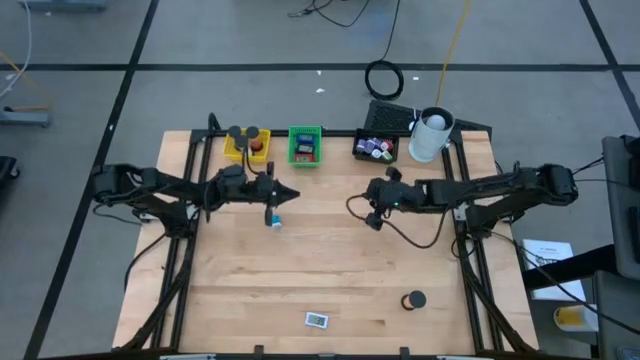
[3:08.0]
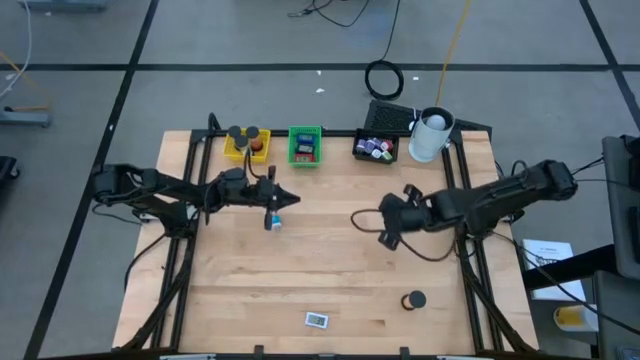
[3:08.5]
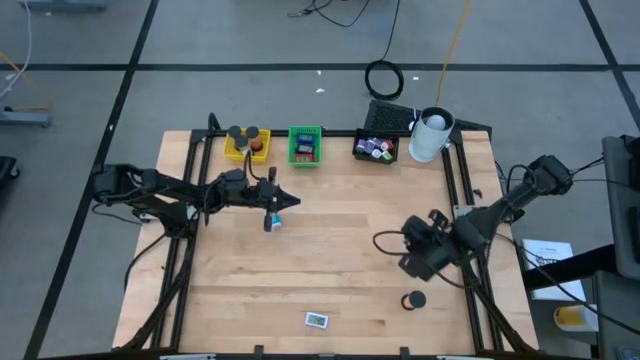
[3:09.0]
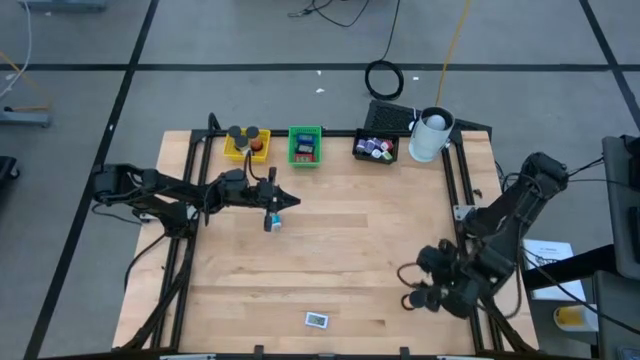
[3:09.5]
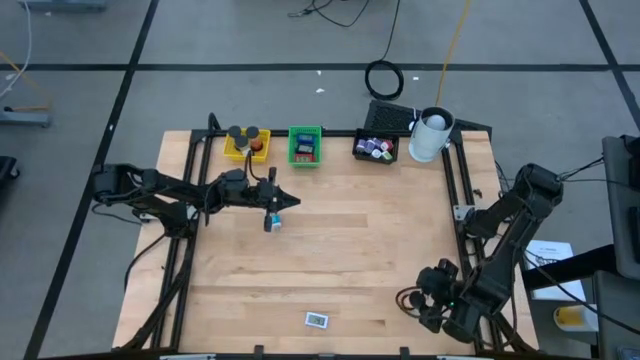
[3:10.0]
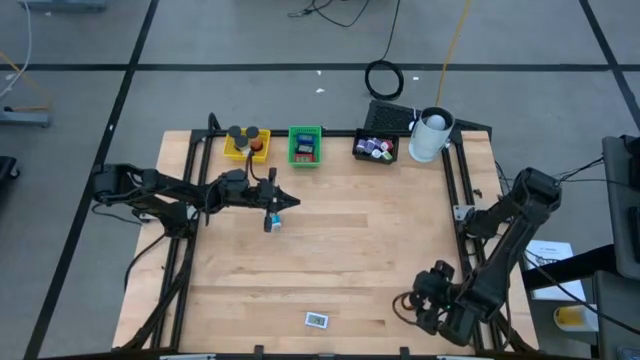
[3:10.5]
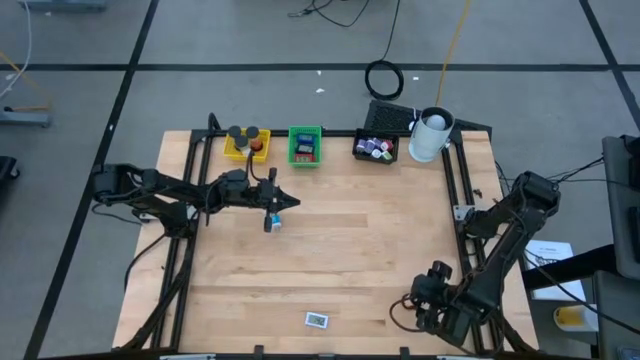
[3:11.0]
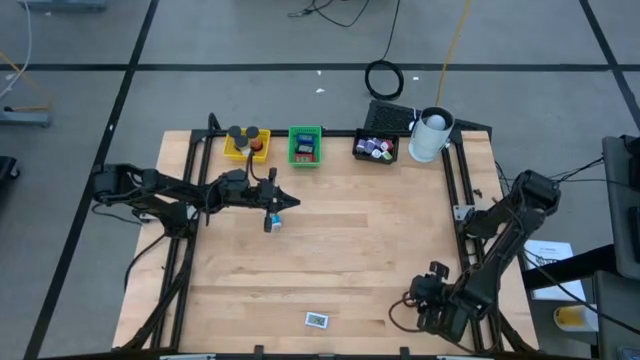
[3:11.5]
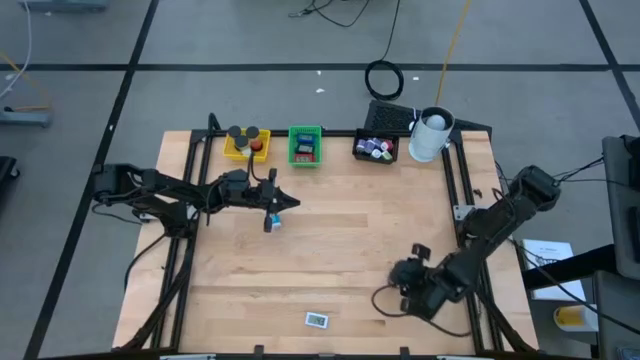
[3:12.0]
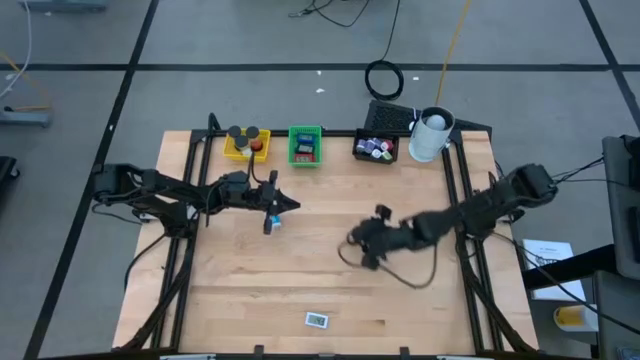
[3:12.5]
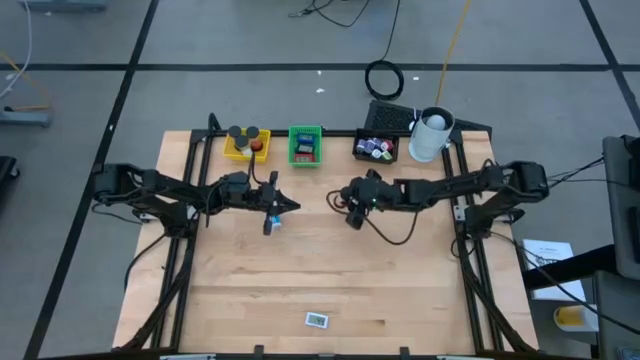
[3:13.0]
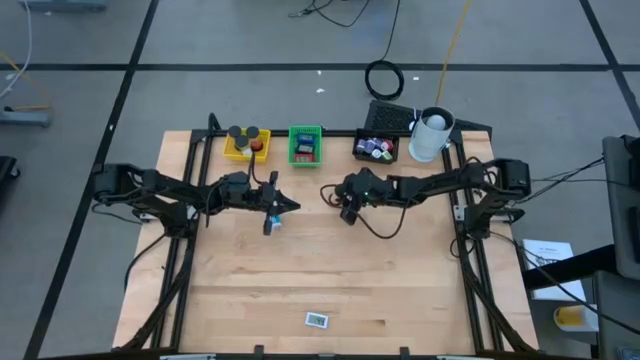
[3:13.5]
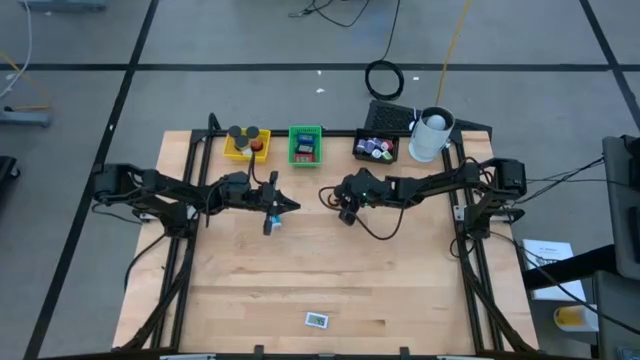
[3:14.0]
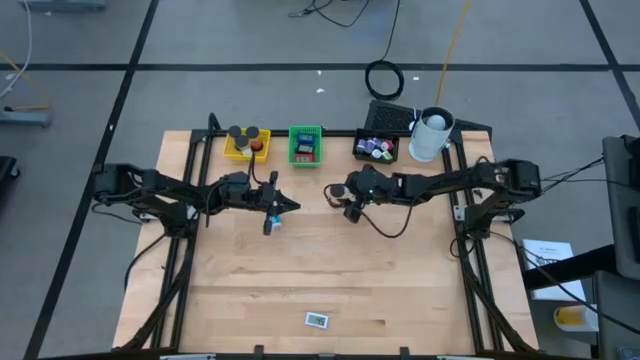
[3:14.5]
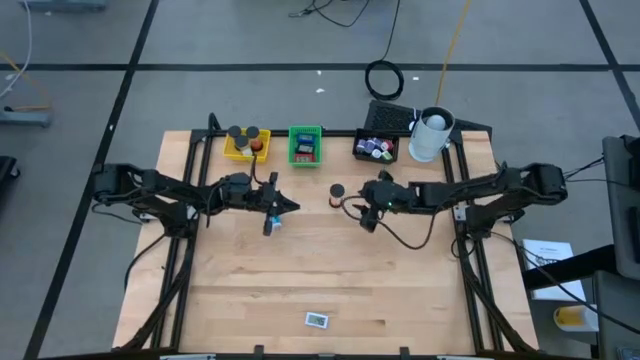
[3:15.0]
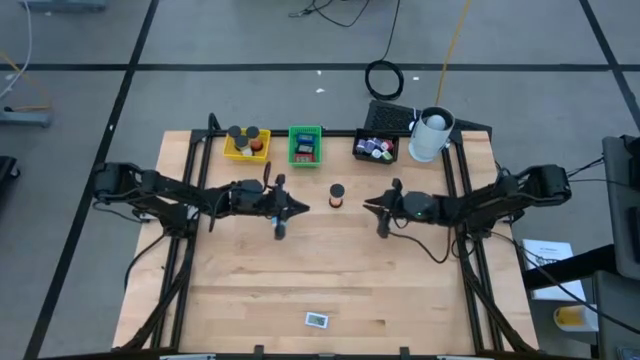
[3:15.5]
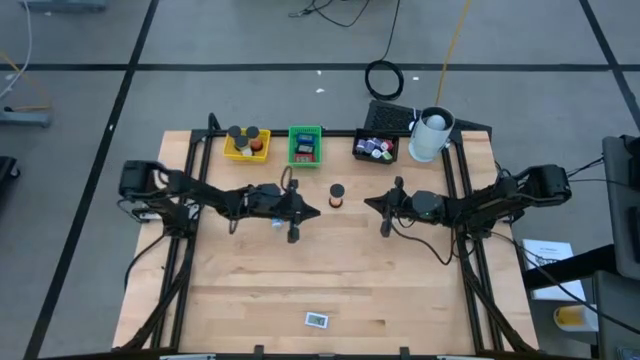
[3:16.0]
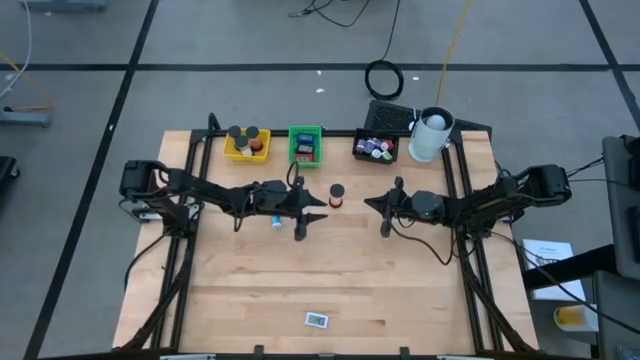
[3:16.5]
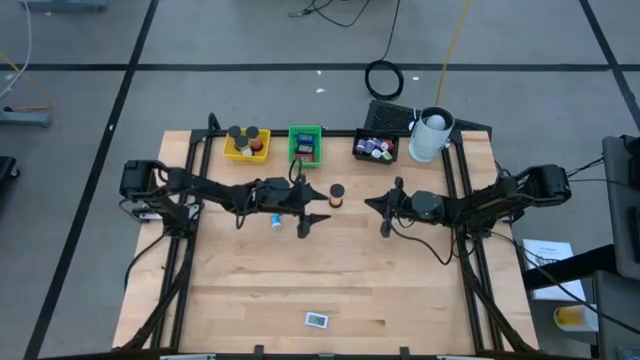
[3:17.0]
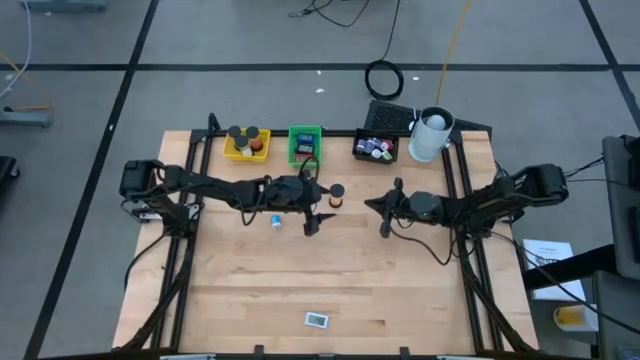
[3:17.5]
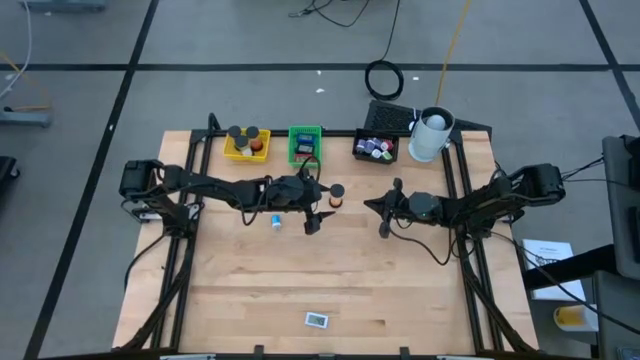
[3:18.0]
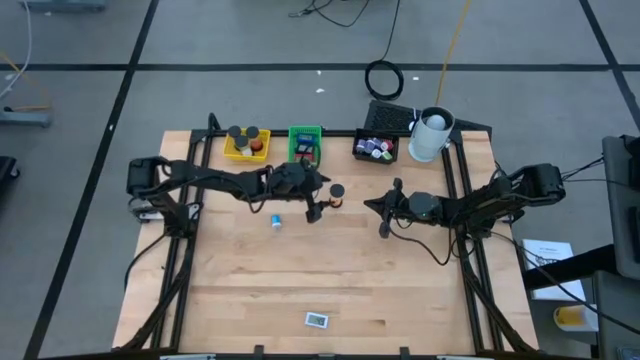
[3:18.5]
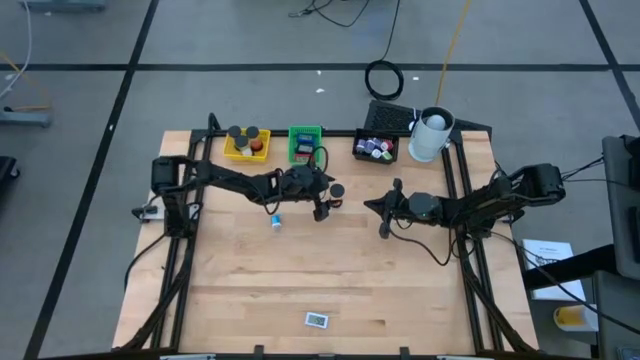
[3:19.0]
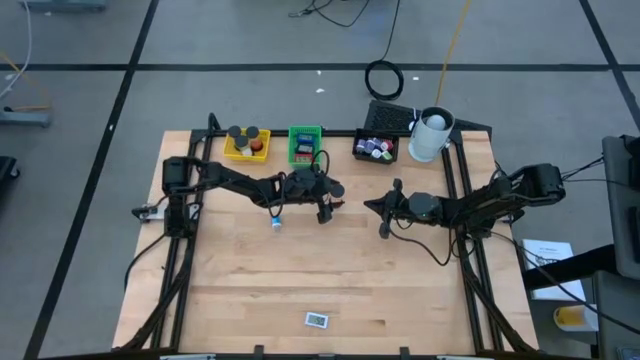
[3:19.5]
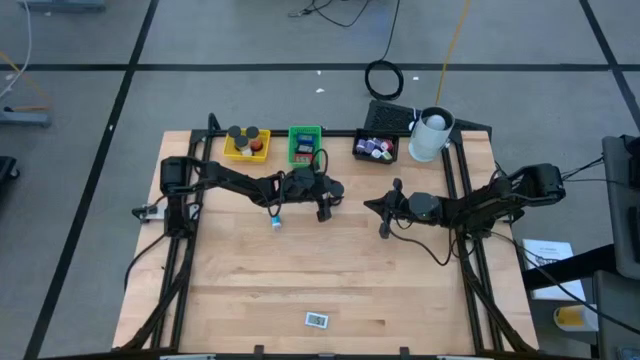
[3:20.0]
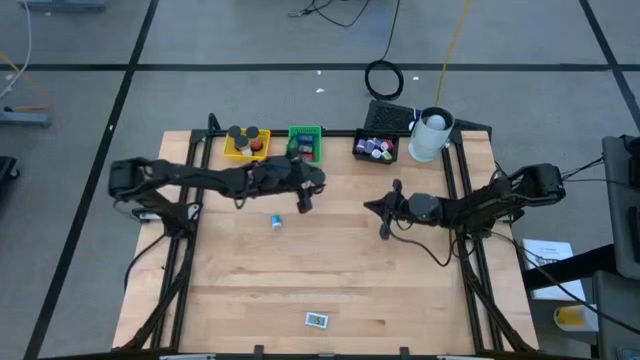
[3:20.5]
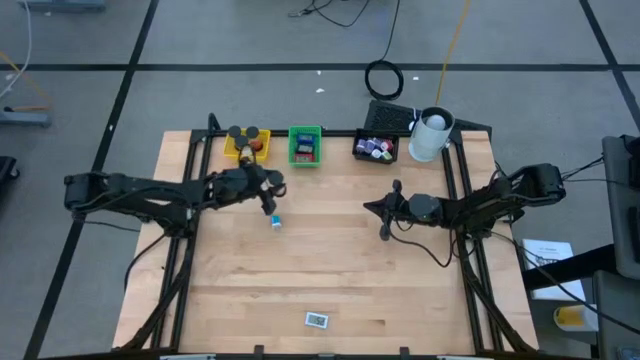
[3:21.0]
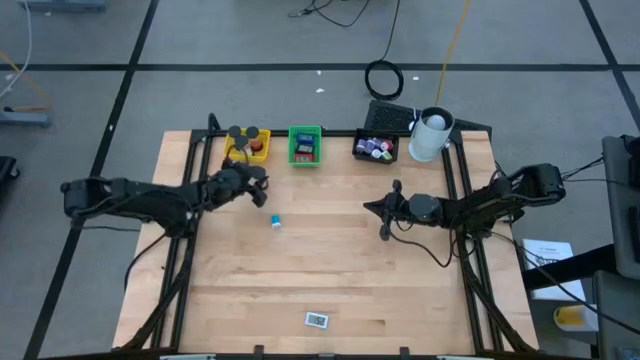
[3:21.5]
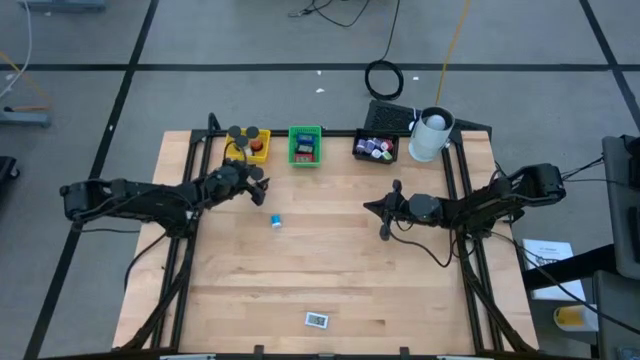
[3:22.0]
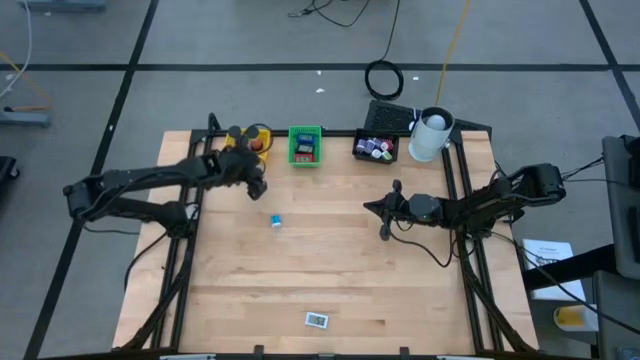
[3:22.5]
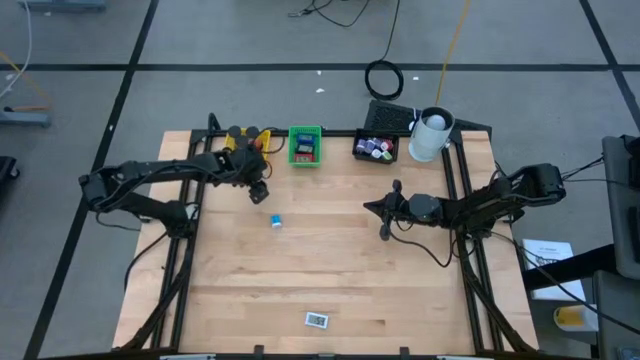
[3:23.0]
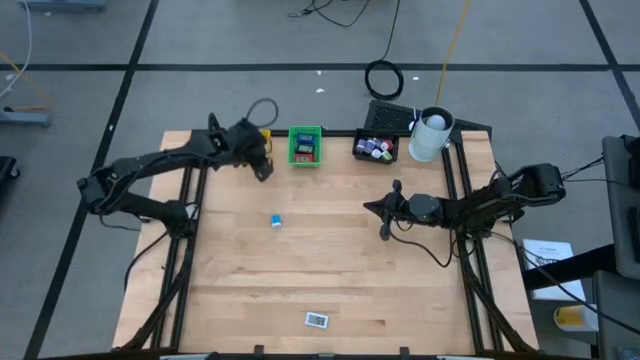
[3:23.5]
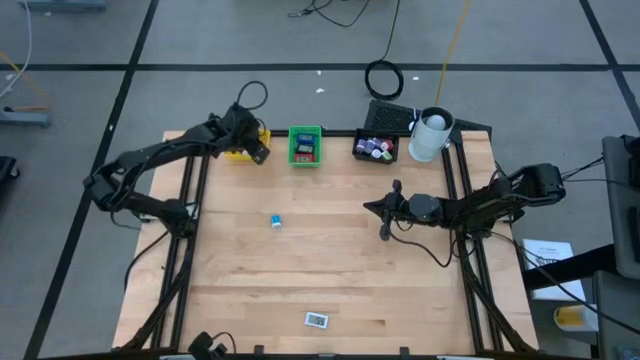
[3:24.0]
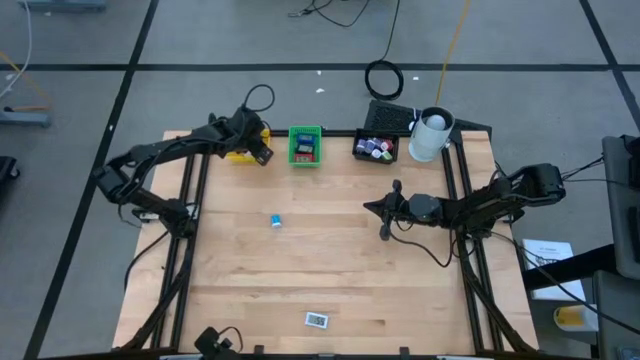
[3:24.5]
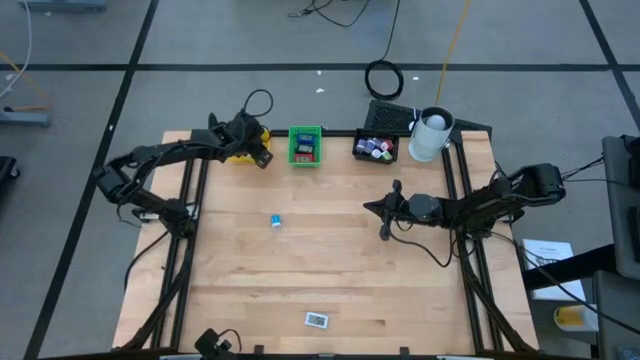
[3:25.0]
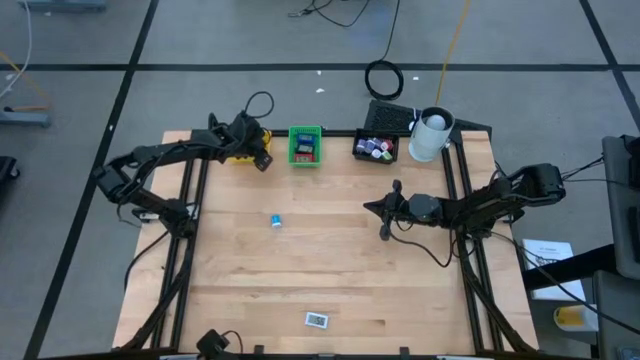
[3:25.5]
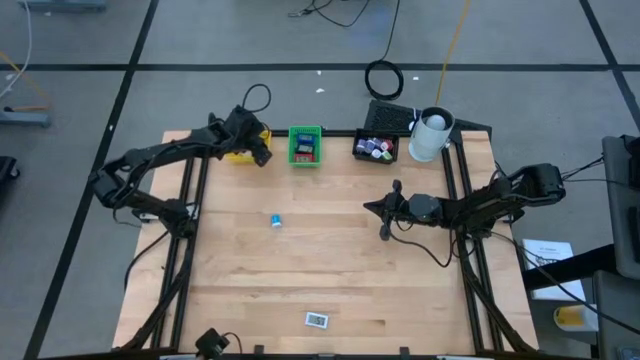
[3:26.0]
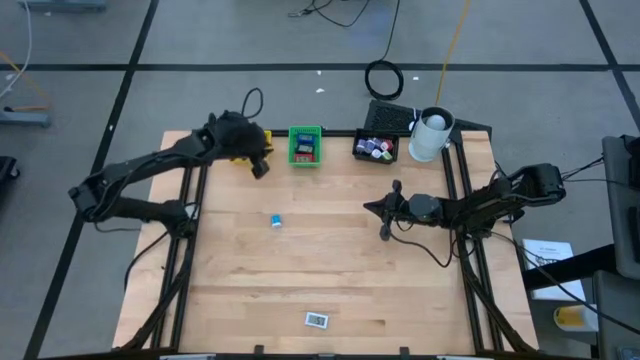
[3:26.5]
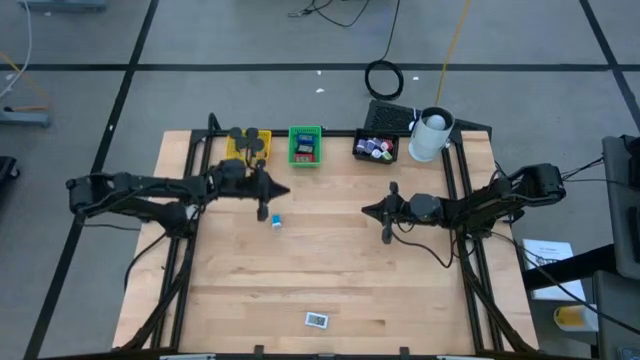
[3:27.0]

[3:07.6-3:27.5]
Task: Pick & Place Office items
Put the orange sand timer in the yellow bin
